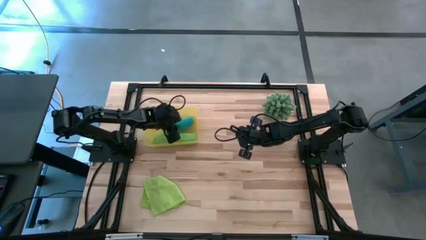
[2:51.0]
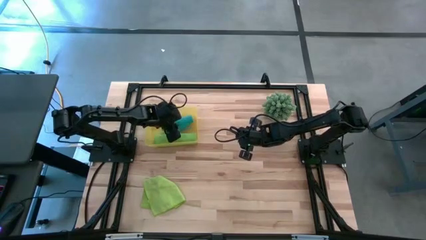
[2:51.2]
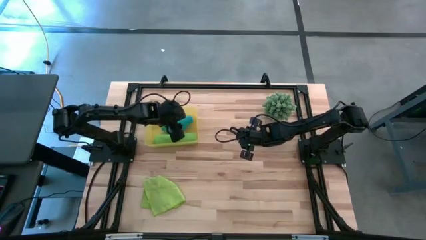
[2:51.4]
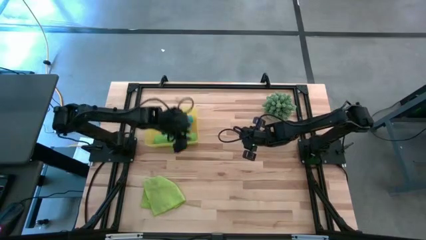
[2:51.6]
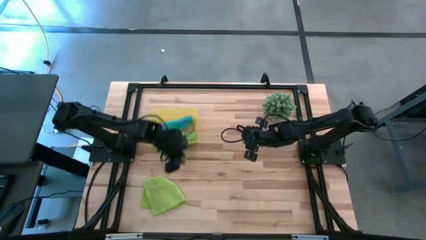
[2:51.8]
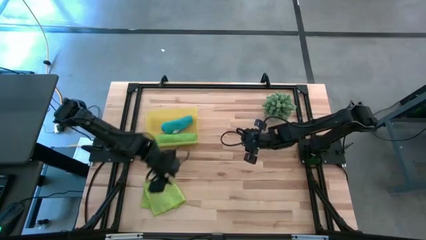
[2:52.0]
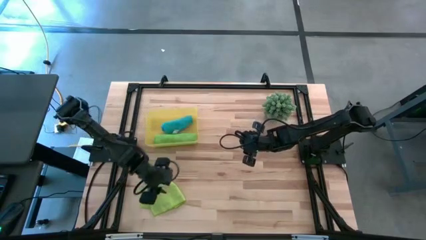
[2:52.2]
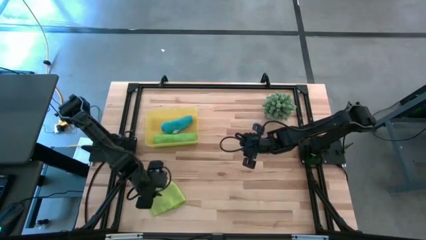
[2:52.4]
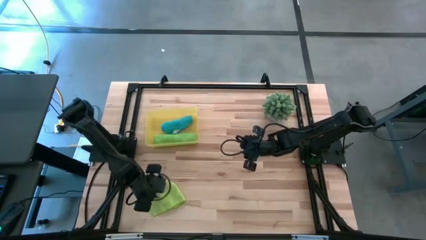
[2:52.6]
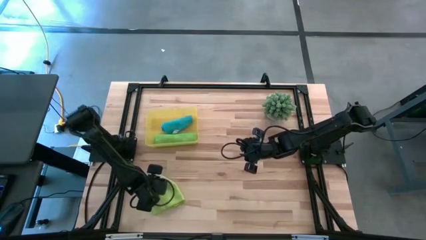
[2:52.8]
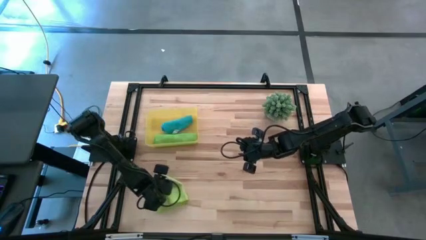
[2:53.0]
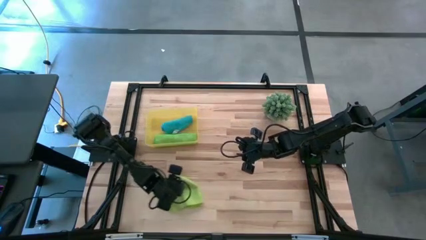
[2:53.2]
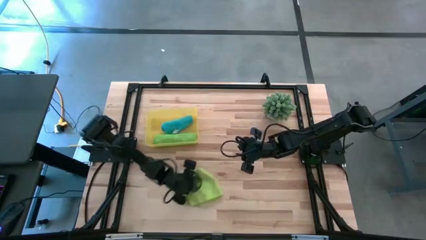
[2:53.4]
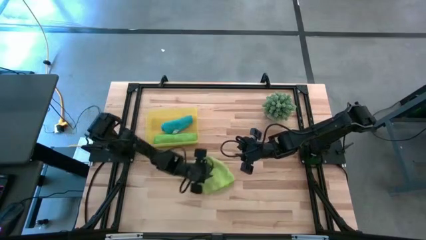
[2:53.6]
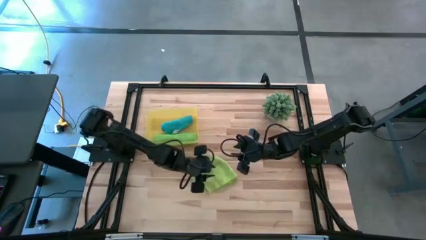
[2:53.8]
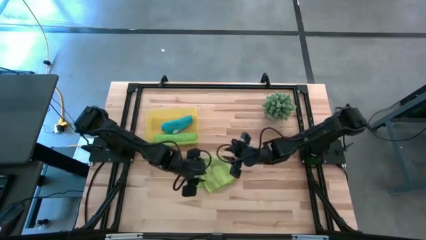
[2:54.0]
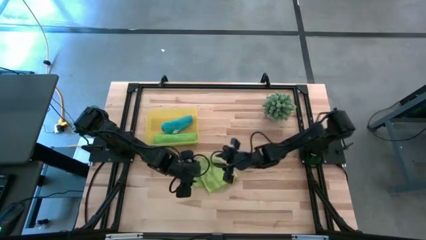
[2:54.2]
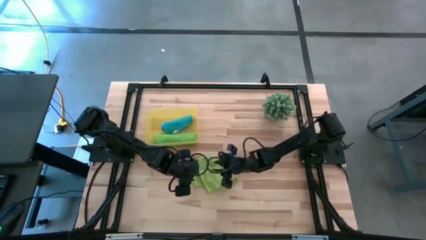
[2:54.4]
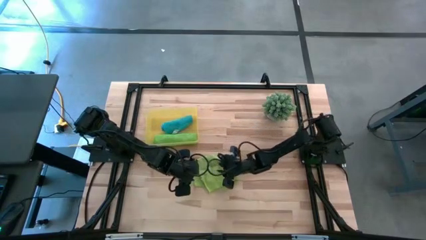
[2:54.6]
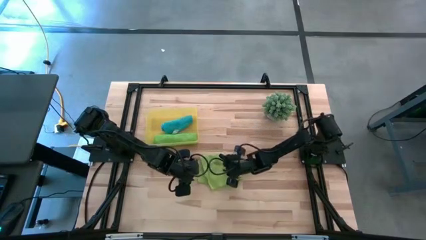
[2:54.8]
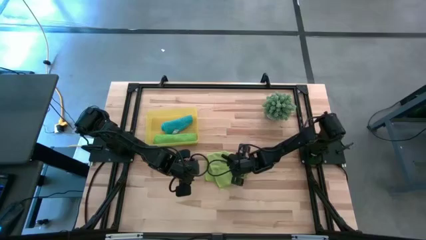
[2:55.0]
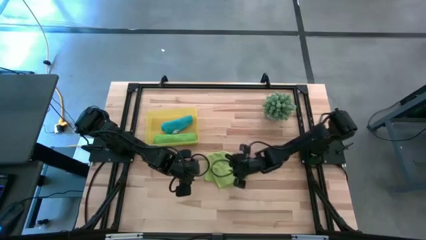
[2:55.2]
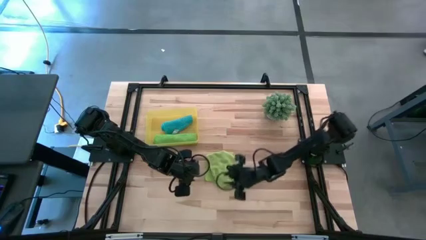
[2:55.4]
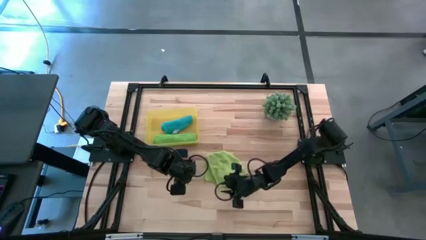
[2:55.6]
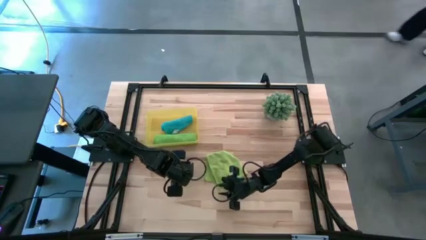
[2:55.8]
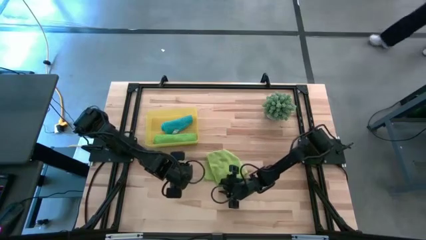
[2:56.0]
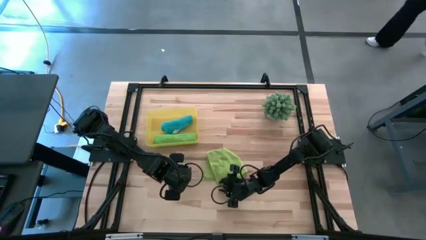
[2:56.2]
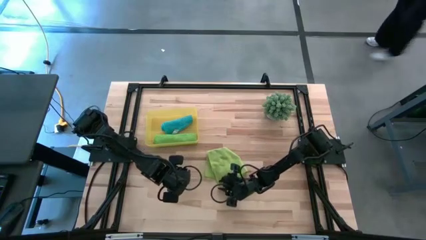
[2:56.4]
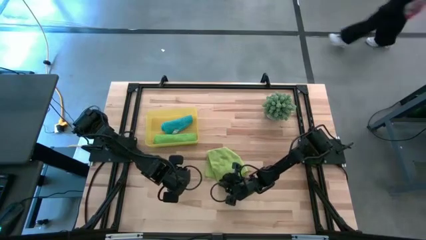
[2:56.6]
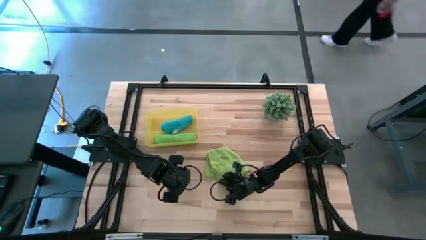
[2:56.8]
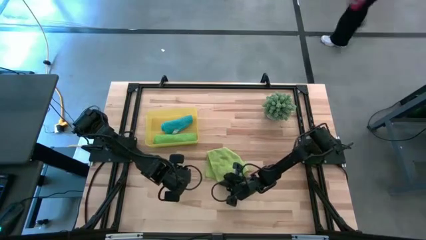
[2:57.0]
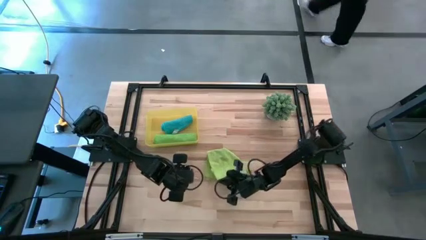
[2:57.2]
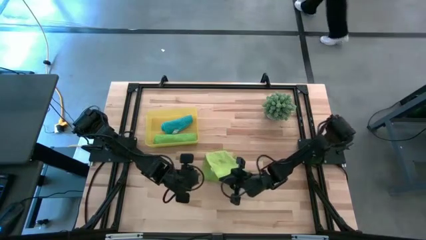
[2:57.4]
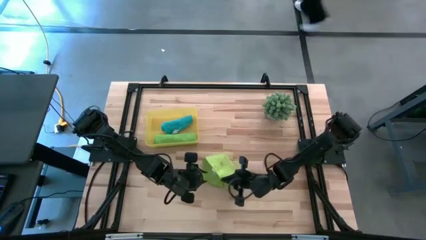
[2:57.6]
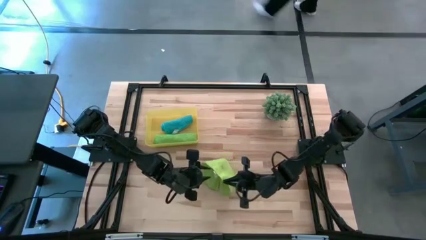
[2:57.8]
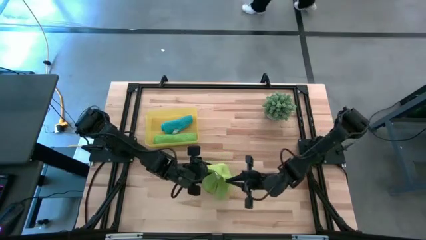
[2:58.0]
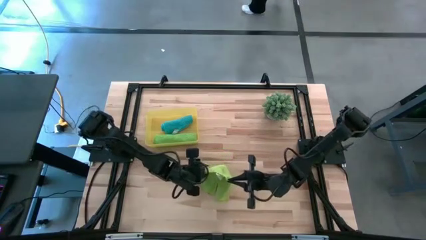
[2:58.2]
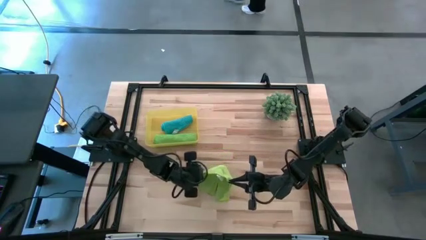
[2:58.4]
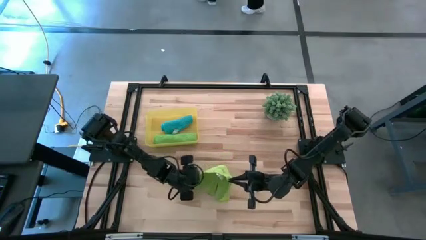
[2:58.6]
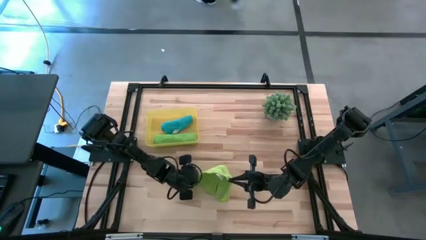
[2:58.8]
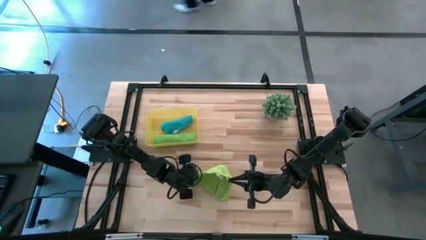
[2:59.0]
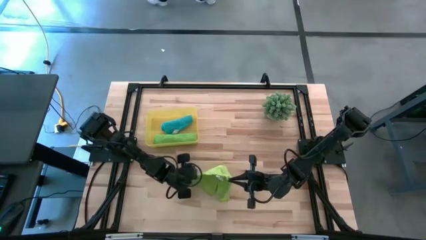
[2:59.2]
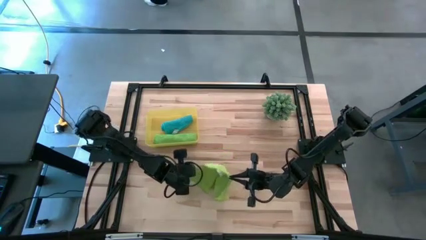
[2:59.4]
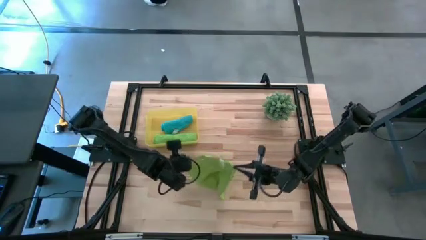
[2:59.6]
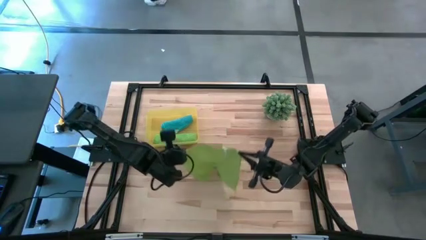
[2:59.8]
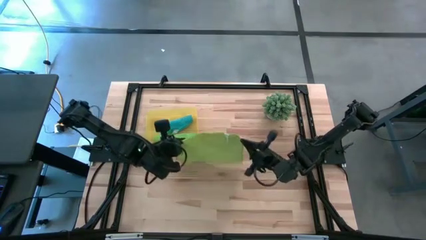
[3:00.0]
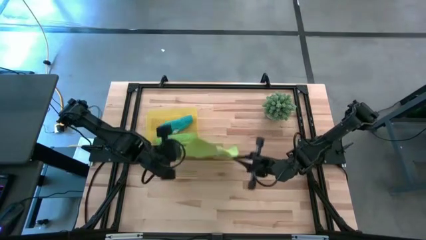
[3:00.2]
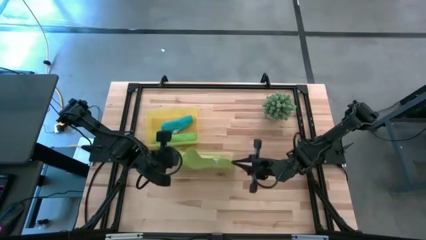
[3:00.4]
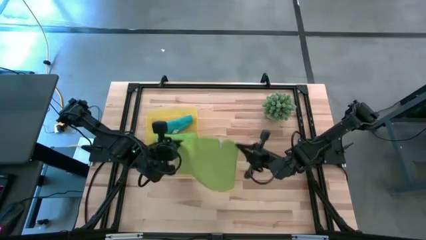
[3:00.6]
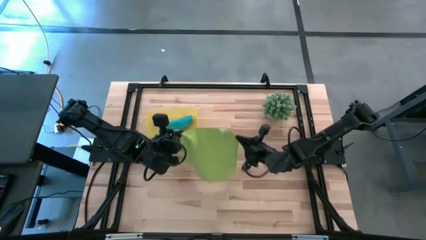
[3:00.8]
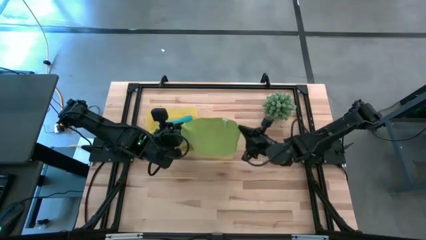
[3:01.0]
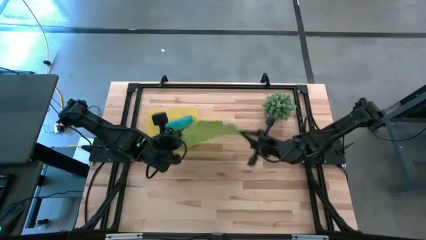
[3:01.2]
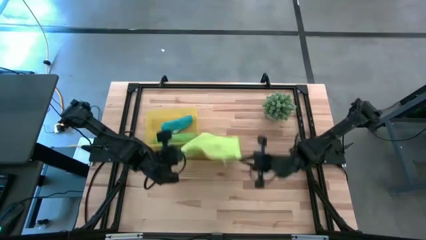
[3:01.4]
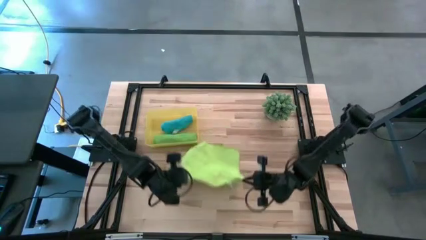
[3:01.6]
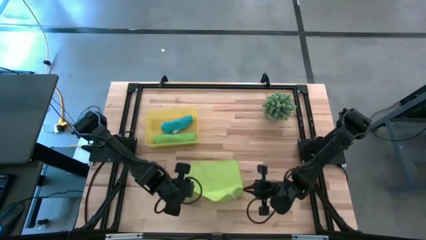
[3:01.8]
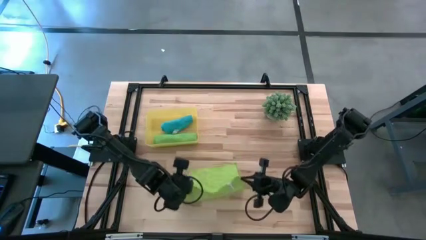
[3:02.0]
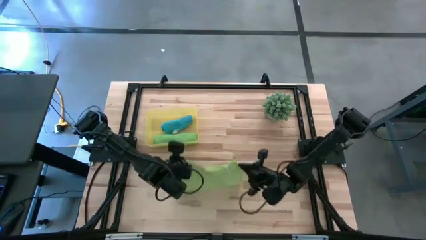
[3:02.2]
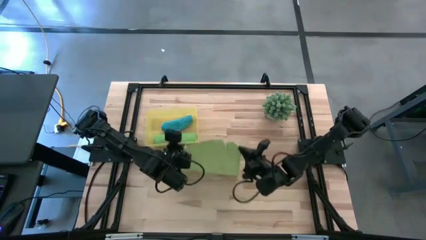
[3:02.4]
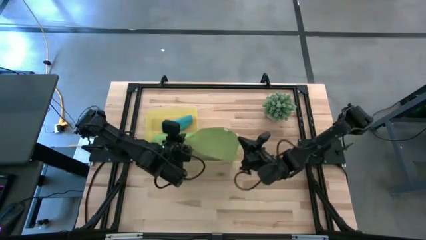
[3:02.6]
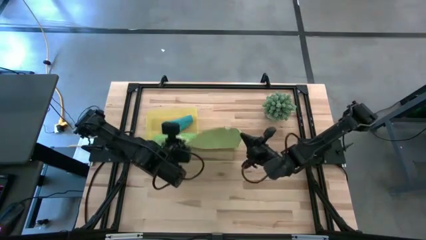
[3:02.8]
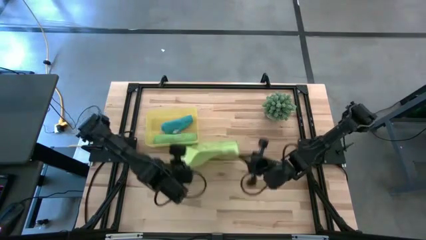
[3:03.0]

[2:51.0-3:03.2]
Task: Roll microfiber towels into tight, uniform cylinder then place into a basket
Fold the light green microfiber towel

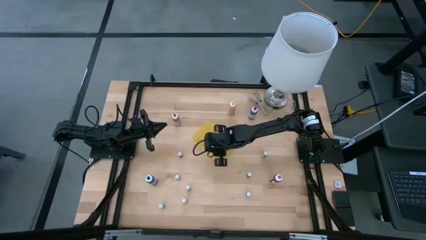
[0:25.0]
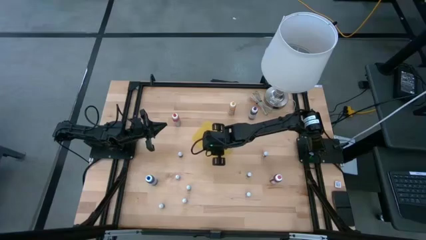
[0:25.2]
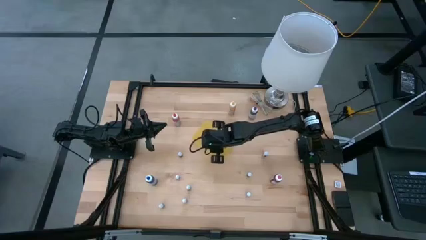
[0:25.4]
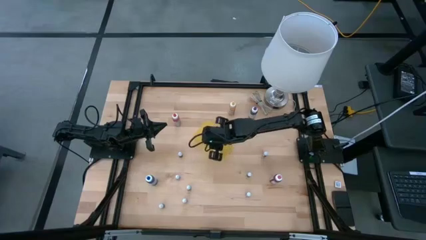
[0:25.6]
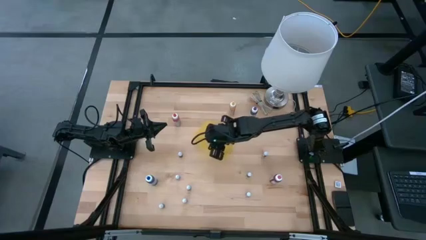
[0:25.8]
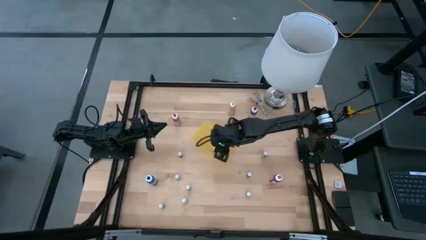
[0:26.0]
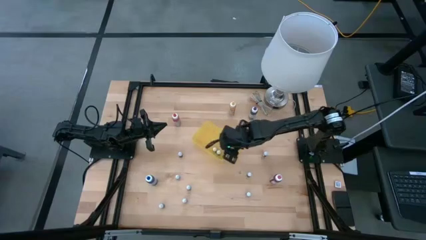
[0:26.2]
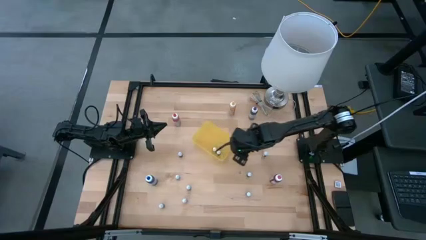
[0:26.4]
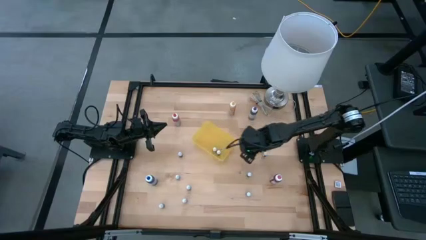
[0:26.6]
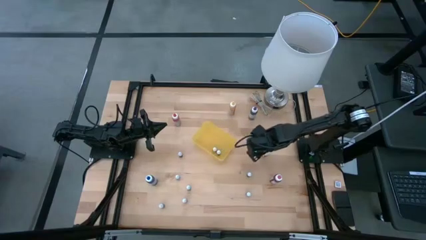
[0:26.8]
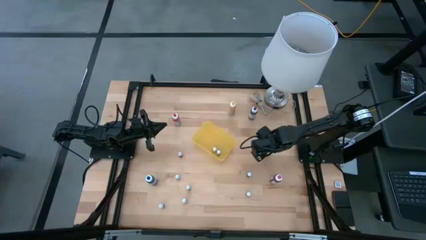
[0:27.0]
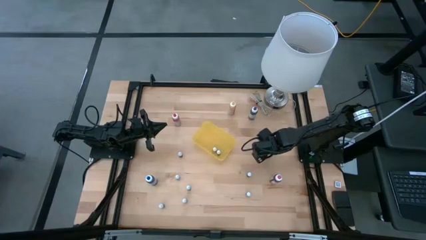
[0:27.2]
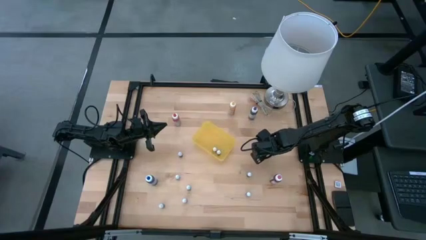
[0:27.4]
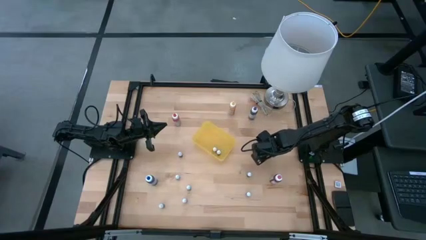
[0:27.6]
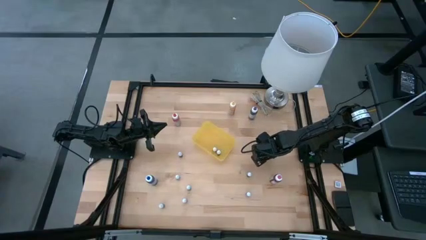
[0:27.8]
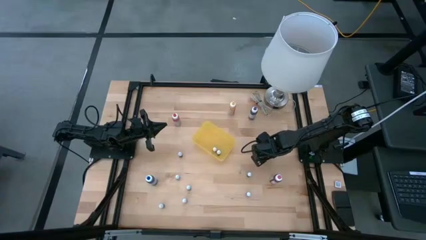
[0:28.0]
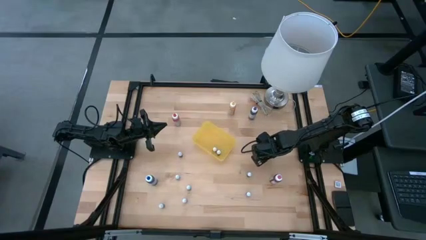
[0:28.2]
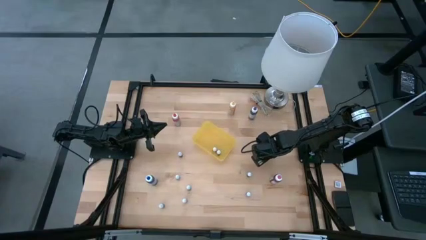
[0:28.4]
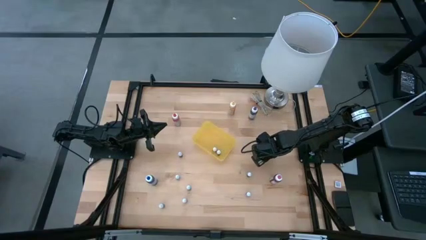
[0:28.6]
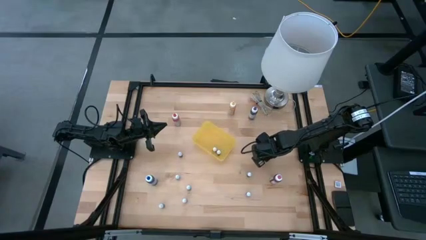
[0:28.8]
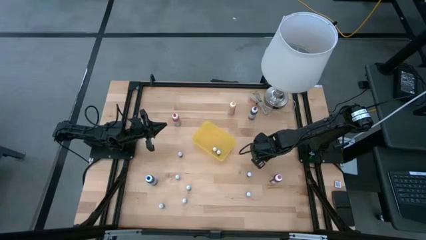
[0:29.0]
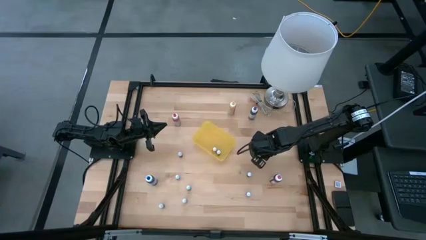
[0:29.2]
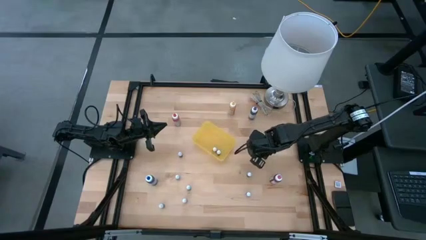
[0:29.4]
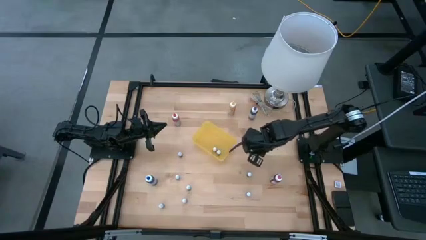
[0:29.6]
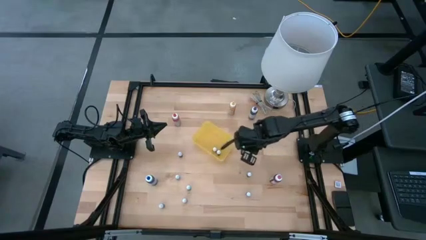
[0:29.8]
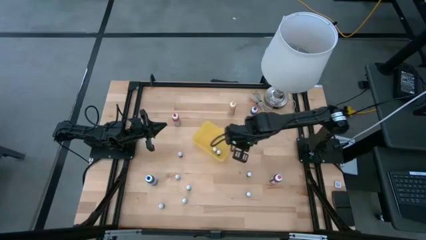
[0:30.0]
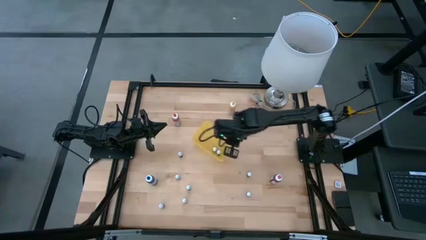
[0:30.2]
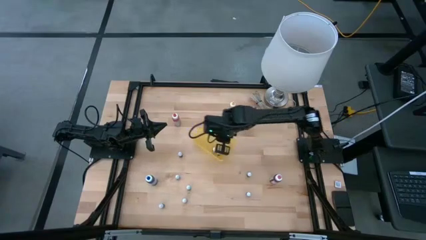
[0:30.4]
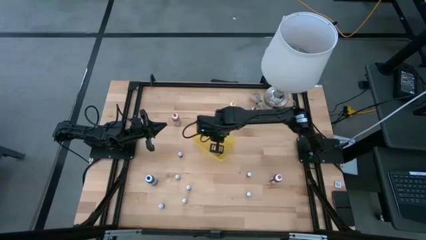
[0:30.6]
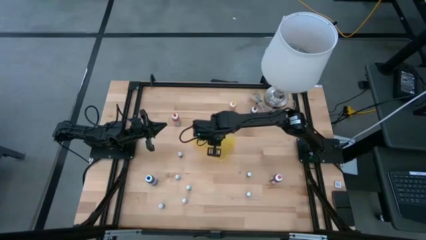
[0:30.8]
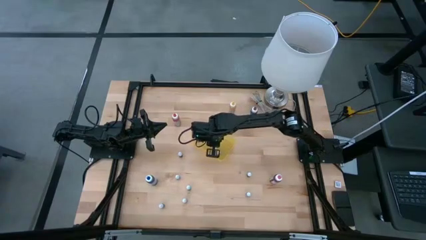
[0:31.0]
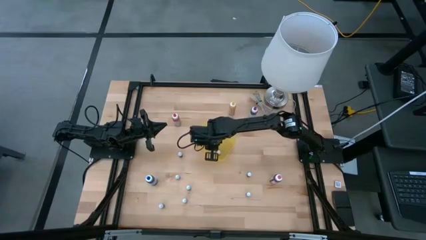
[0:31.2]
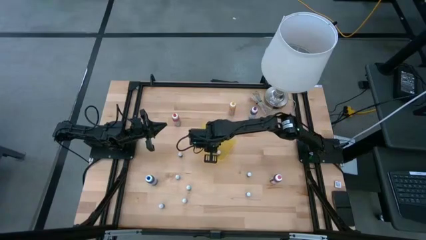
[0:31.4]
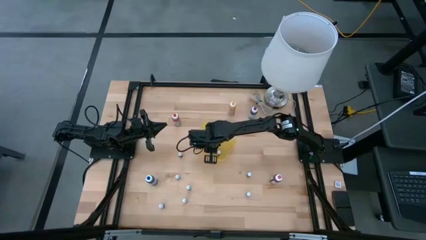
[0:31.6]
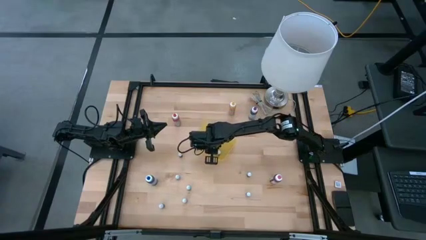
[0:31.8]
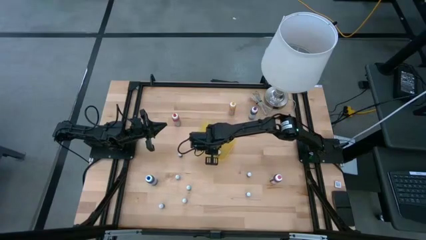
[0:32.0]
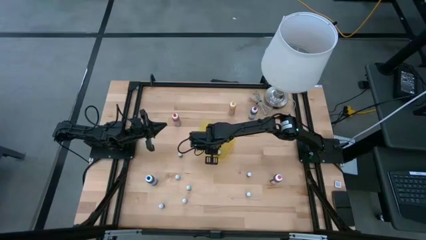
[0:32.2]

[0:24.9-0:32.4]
Task: Pick & Place food coloring
Put the small blue food coloring bottle into the yellow bin
